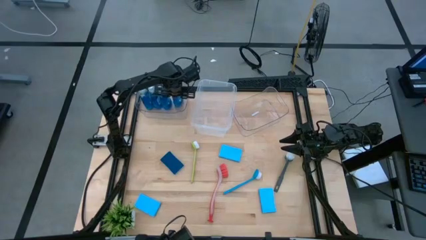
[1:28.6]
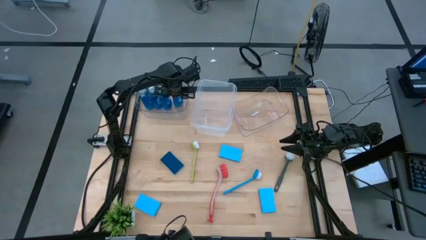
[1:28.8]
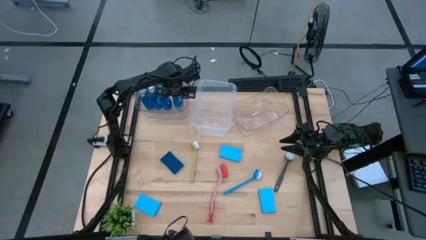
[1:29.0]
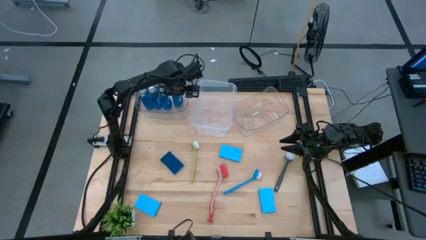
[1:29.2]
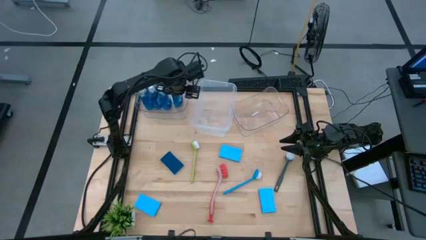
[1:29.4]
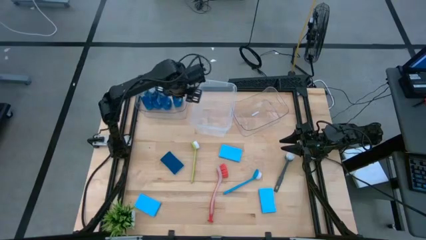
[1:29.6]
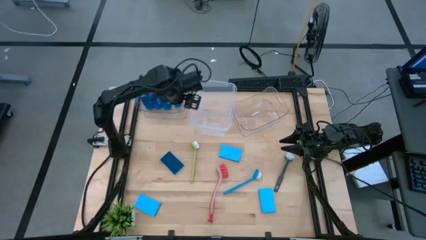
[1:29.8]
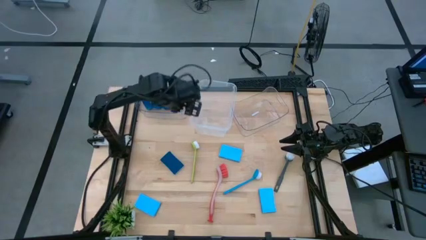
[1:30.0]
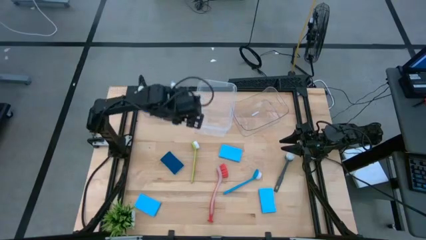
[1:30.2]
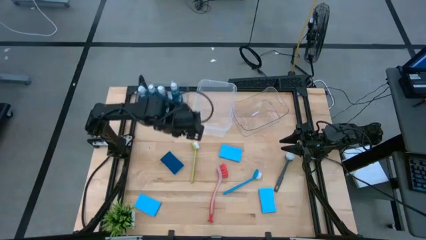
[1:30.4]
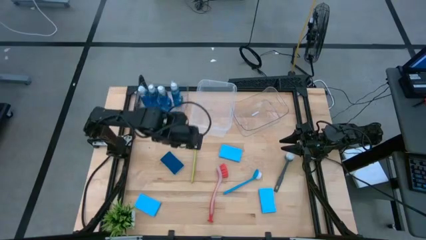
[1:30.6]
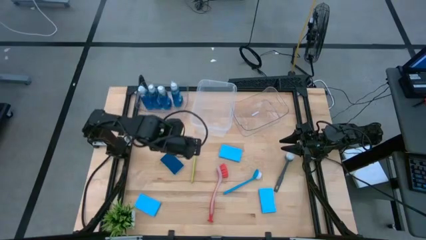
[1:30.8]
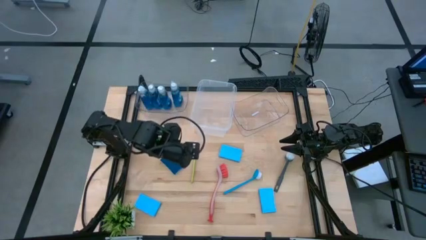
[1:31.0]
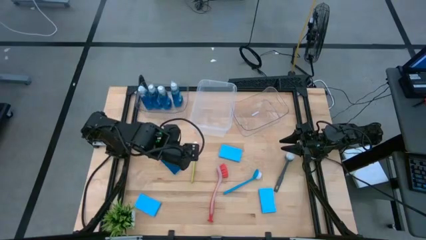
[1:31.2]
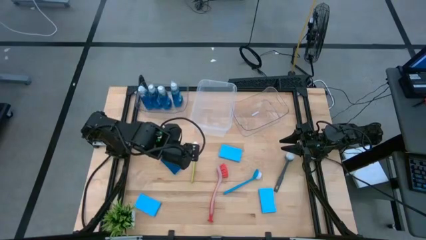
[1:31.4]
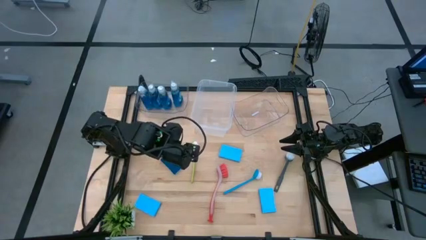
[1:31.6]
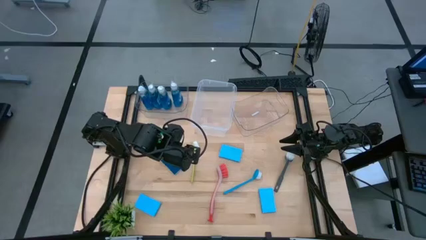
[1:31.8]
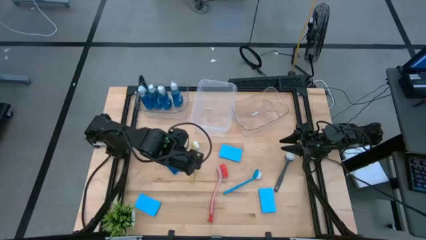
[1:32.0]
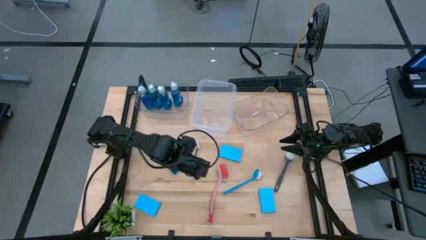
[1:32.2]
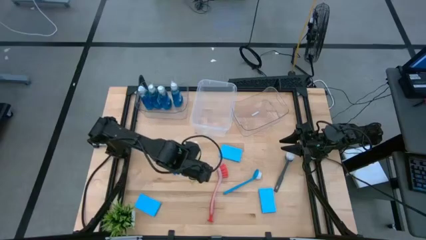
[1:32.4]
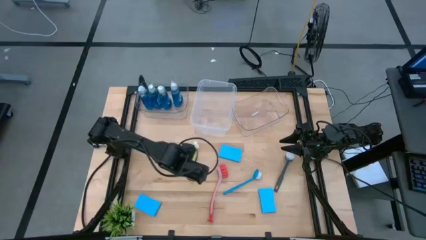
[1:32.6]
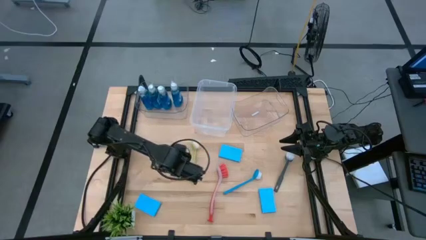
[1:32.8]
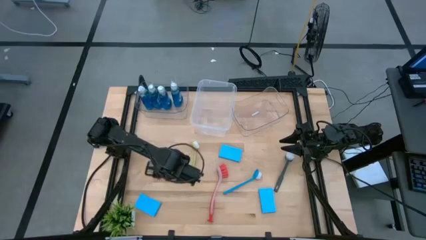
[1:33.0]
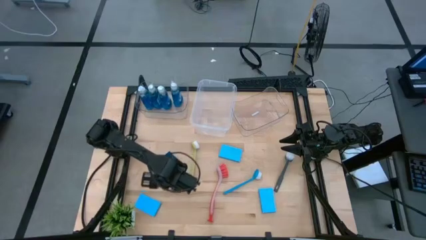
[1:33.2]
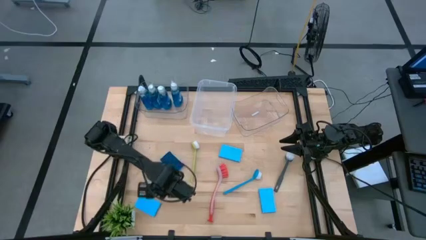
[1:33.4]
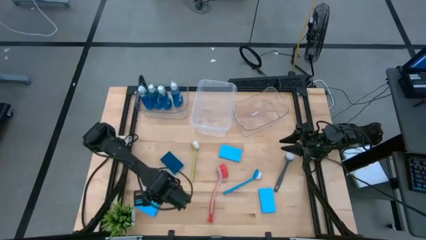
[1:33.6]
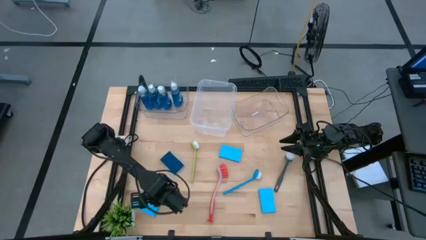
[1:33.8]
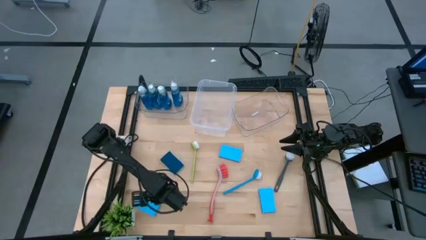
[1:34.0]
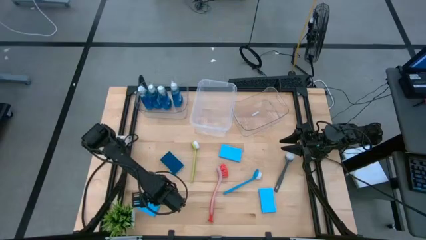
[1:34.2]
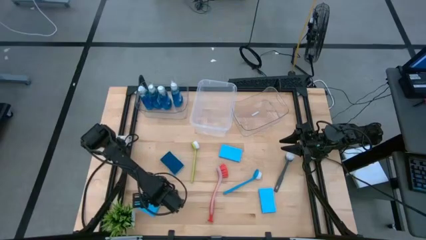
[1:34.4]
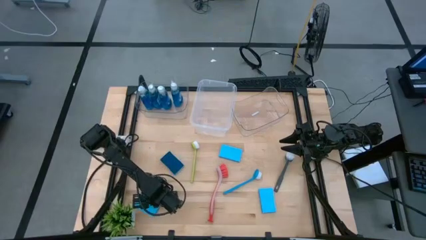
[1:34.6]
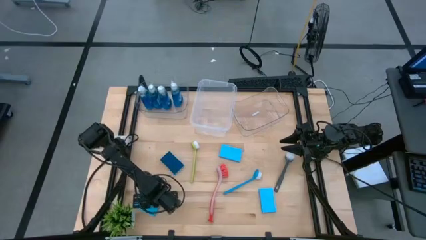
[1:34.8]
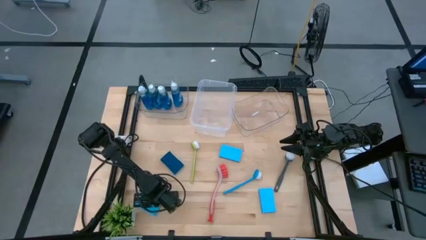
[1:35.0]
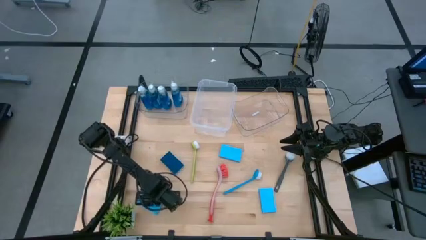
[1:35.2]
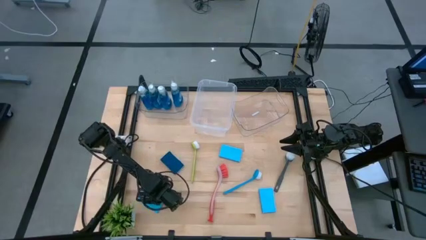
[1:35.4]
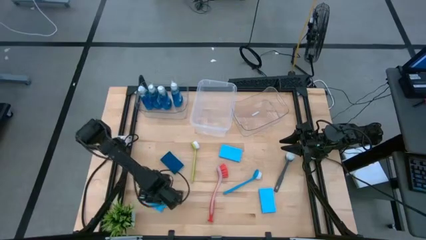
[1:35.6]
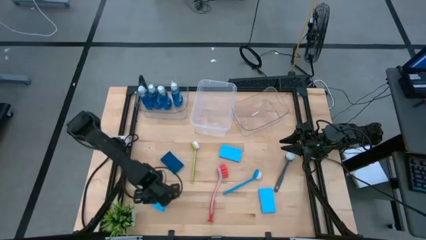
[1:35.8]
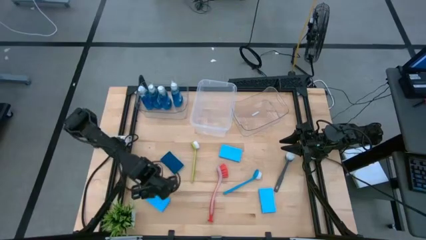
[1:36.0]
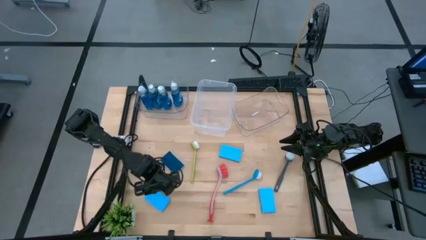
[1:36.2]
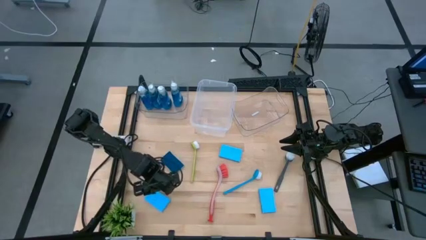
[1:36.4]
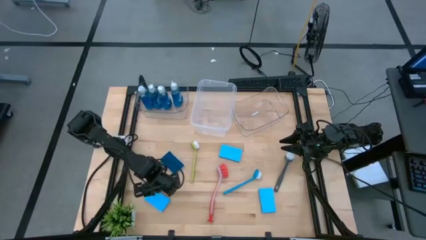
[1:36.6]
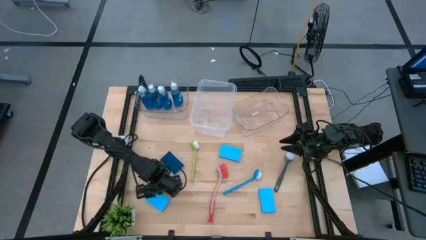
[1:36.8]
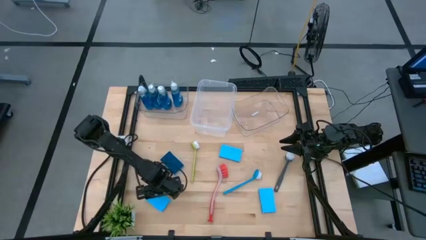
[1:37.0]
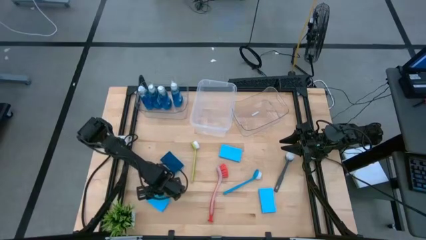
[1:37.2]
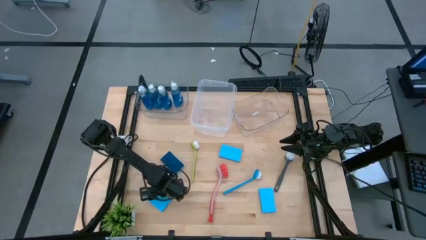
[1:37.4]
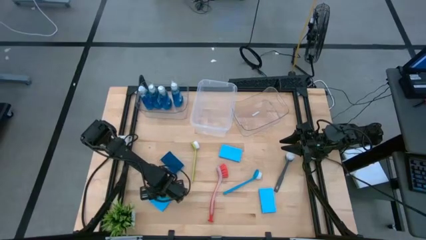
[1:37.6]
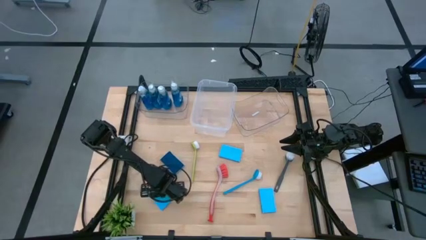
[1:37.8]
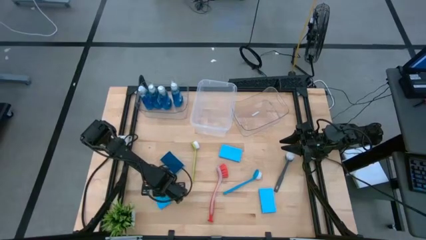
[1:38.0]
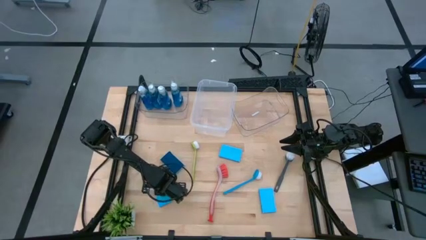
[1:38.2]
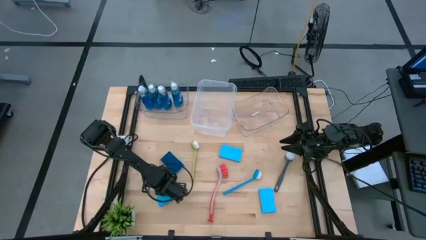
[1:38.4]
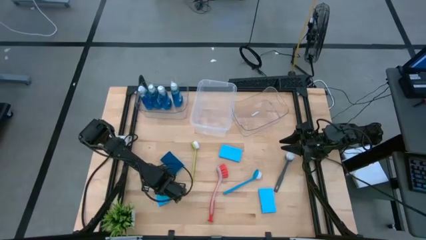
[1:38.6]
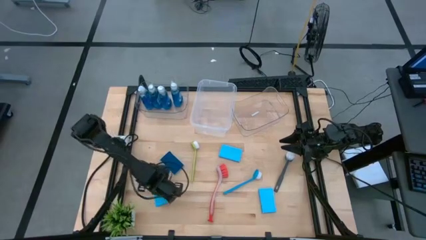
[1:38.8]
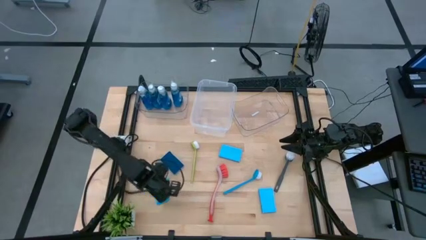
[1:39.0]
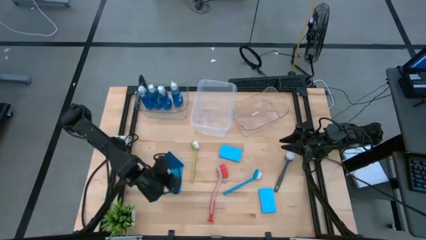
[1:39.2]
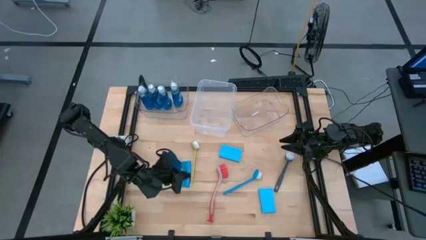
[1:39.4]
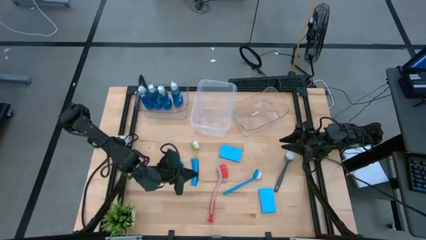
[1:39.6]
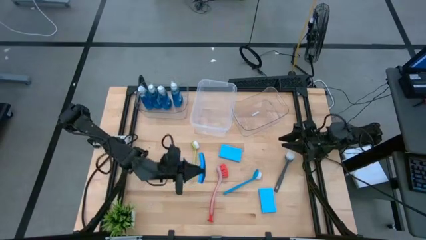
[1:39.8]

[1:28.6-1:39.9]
Task: Pick & Place Kitchen Sink Supplies
Put the sponge into the right transparent bin

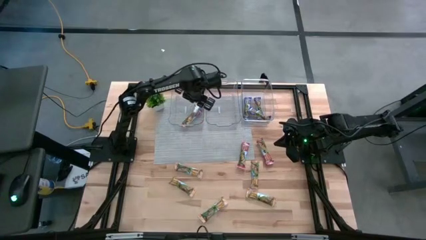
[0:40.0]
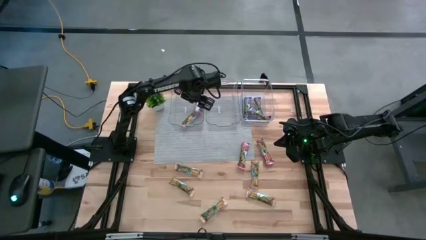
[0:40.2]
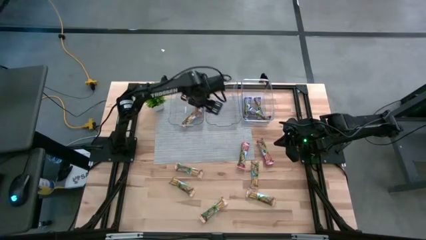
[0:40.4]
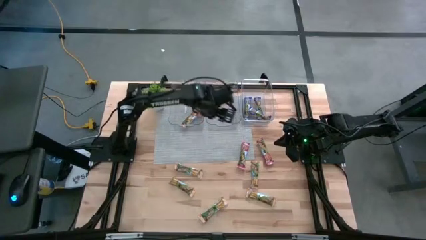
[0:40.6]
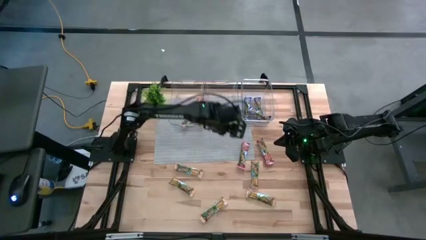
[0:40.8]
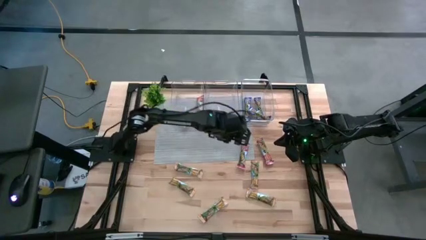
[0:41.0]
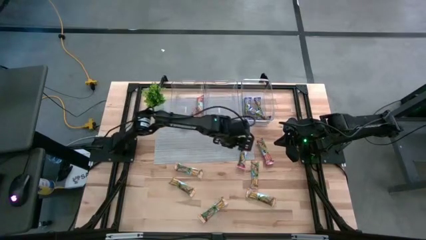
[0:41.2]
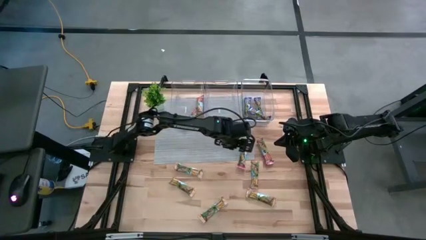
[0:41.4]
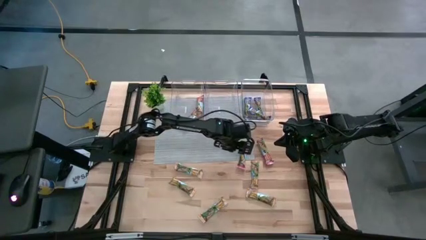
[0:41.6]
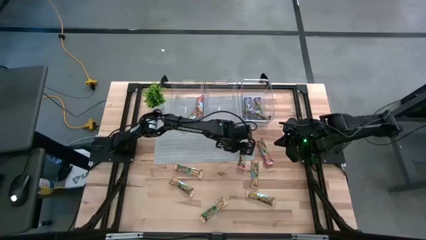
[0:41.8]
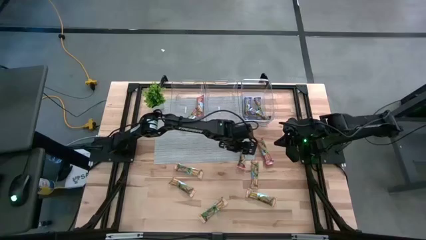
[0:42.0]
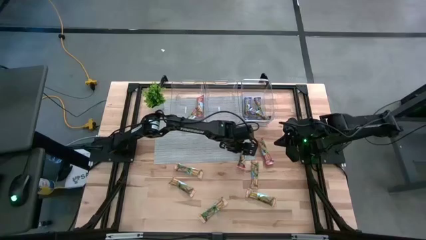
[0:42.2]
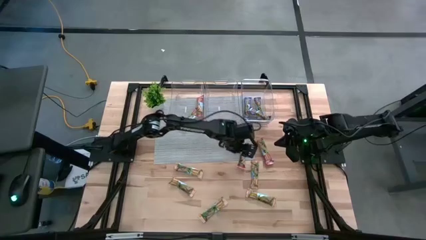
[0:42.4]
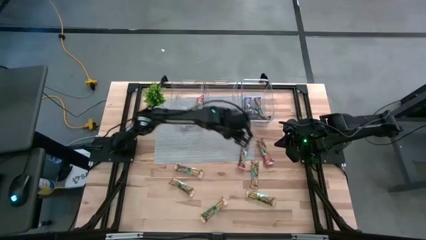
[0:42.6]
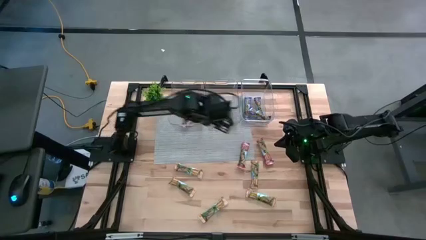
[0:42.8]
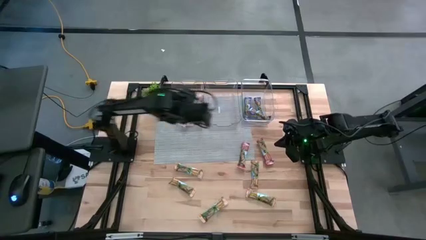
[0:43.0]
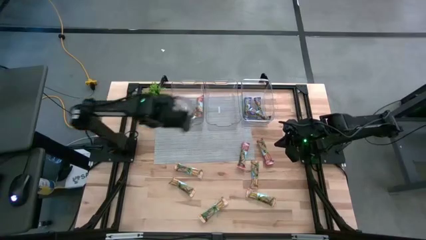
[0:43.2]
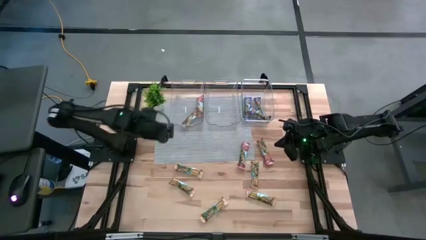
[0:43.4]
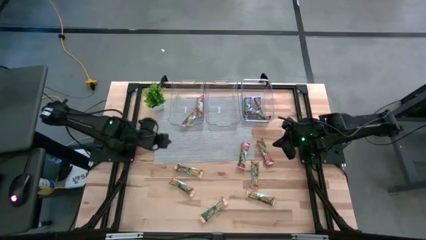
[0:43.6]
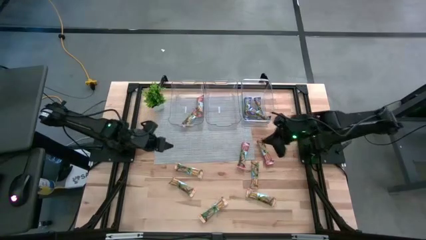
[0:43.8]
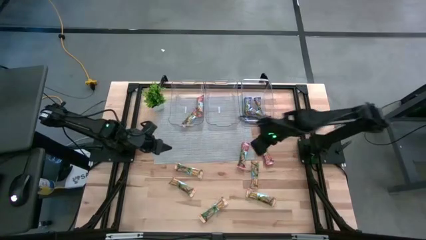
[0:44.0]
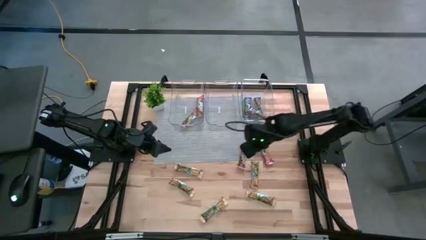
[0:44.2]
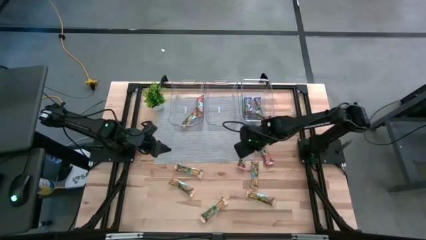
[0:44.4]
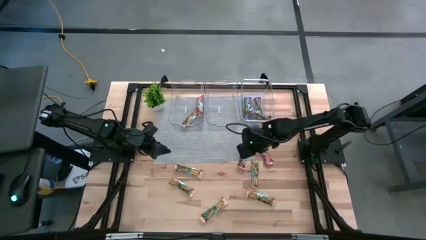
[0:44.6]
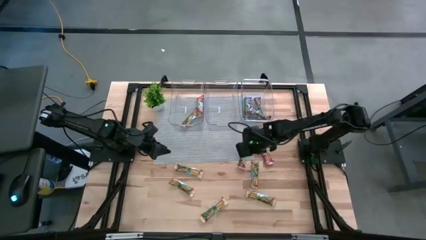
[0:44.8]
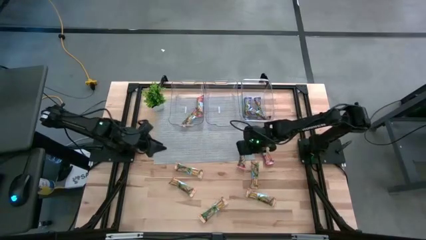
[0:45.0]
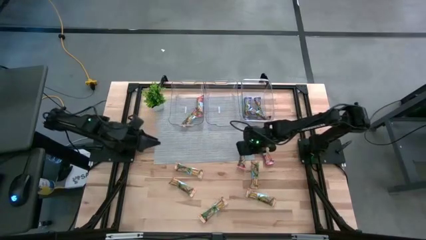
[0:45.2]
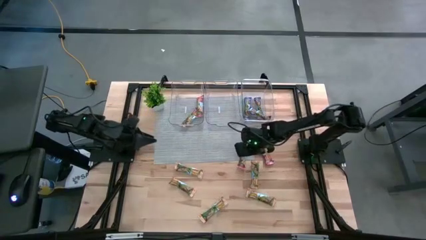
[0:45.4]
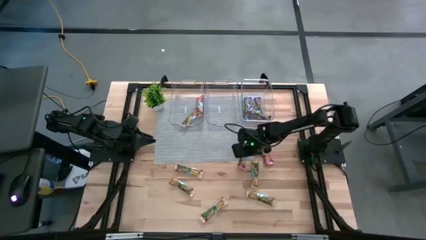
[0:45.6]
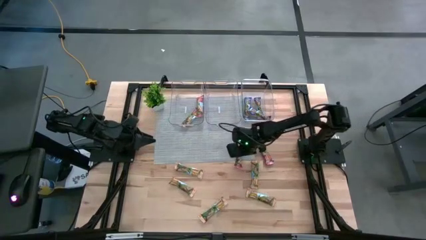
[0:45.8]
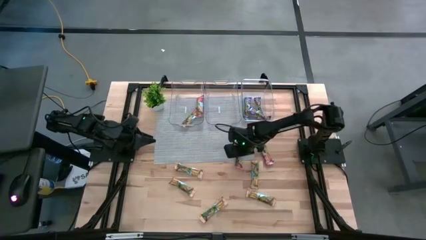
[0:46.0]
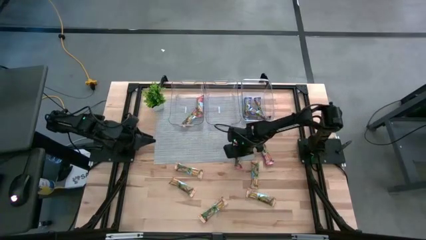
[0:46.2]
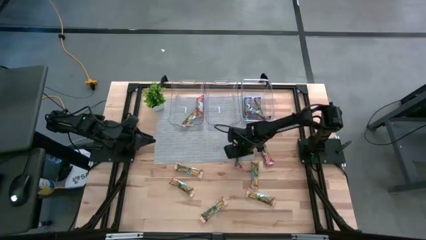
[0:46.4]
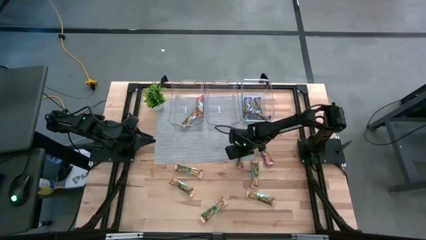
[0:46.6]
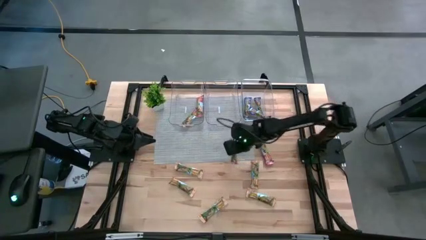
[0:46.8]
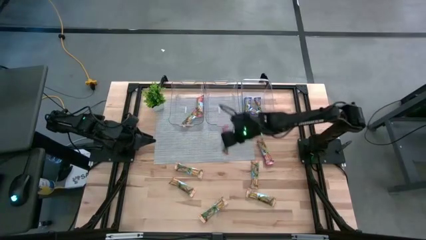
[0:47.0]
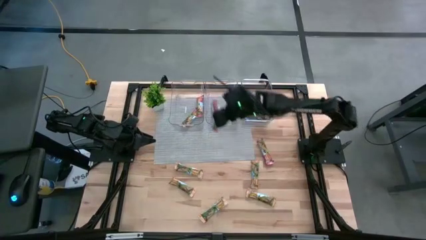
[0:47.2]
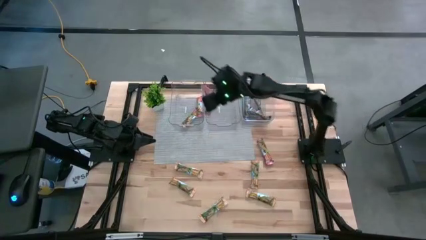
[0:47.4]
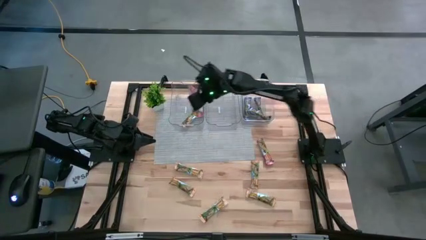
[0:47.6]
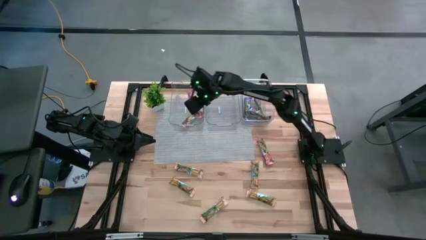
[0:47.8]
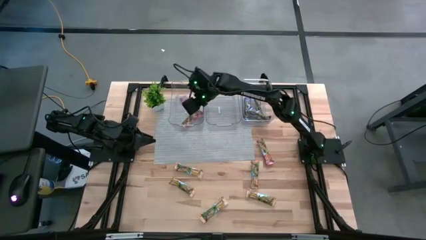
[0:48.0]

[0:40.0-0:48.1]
Task: Pick and place Granola Bars by type
Put the red granola bar into the left transparent bin
